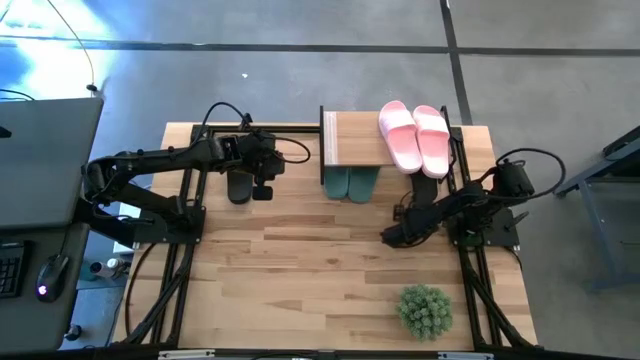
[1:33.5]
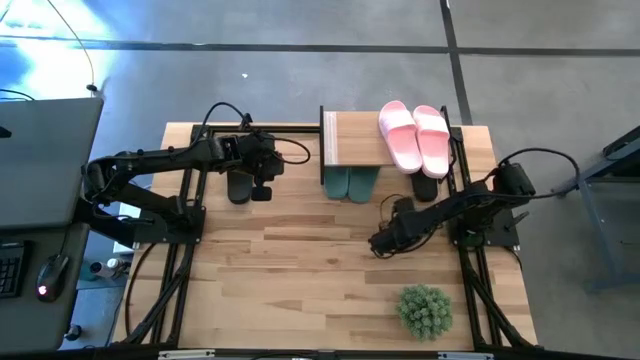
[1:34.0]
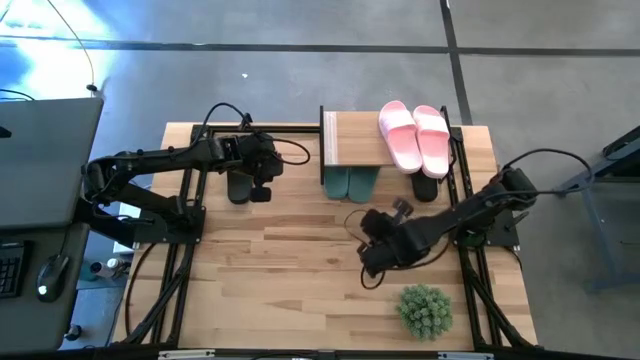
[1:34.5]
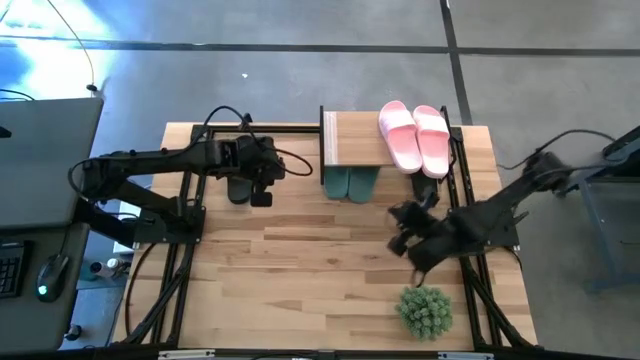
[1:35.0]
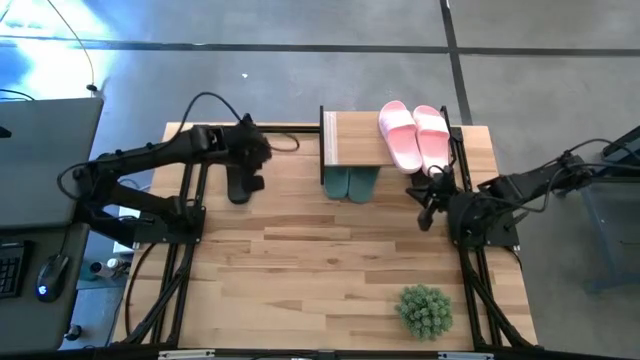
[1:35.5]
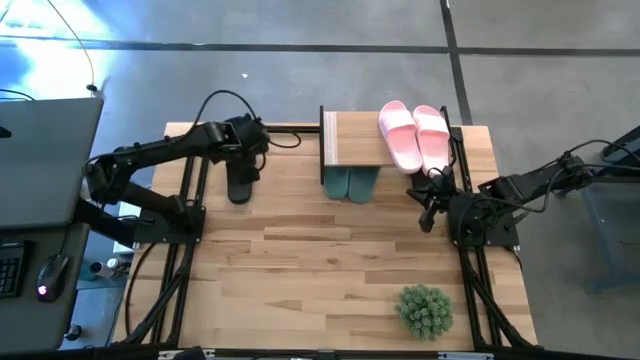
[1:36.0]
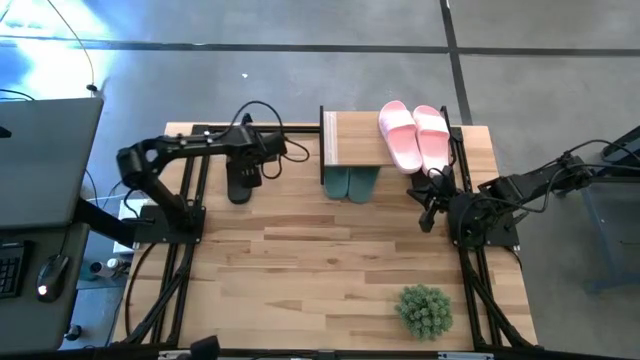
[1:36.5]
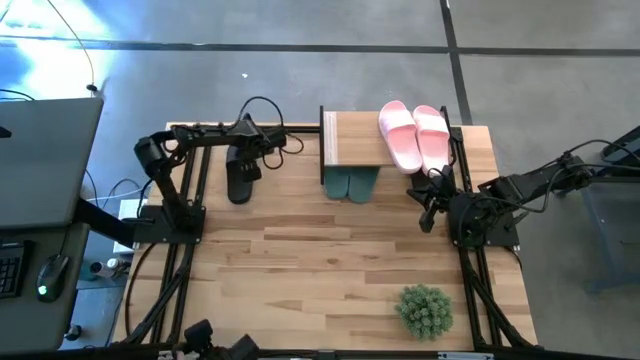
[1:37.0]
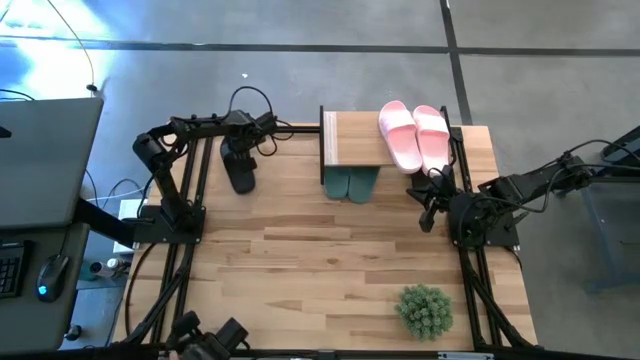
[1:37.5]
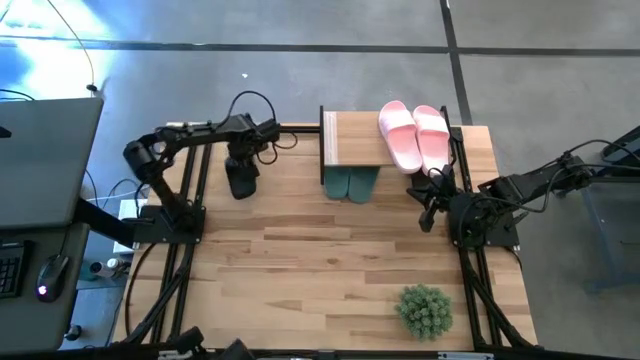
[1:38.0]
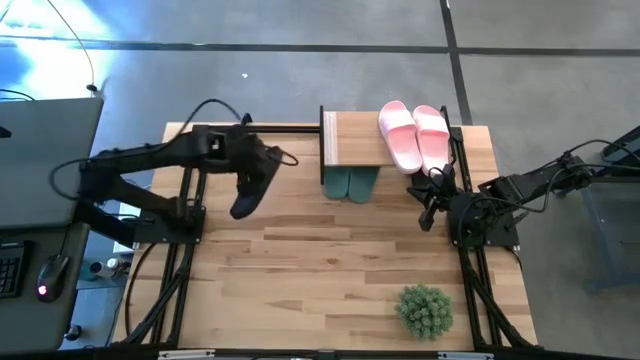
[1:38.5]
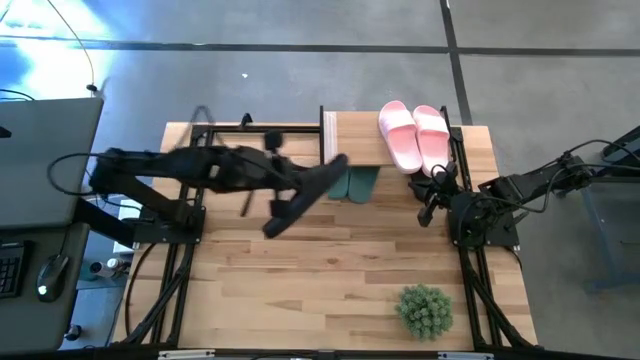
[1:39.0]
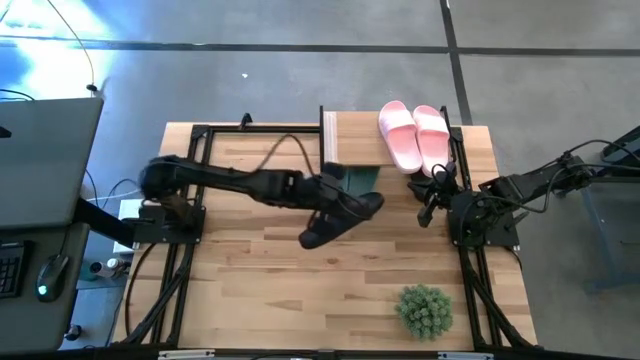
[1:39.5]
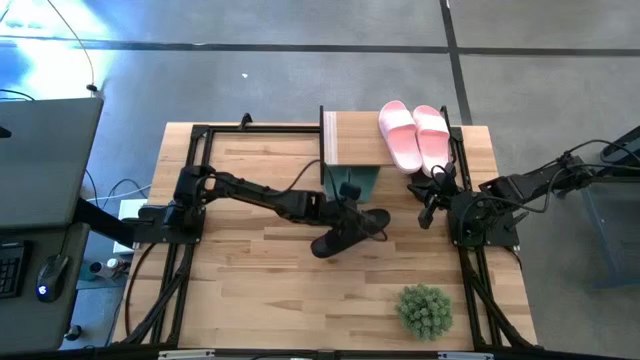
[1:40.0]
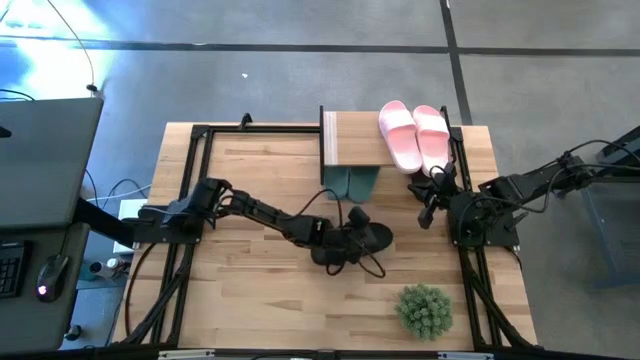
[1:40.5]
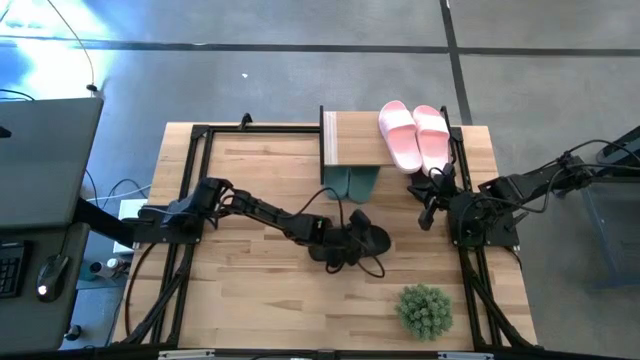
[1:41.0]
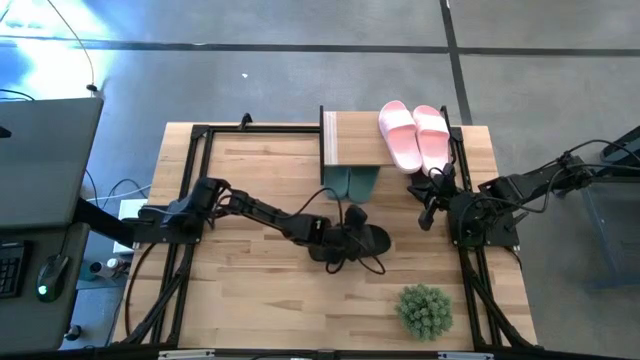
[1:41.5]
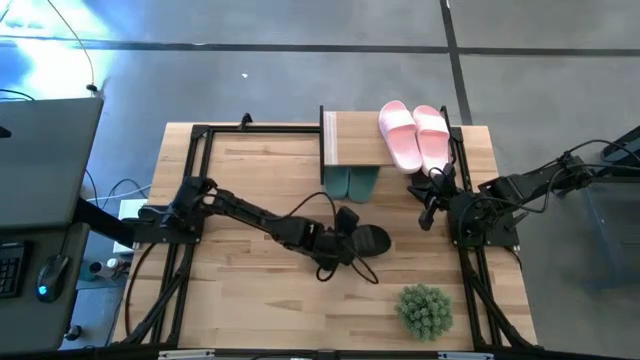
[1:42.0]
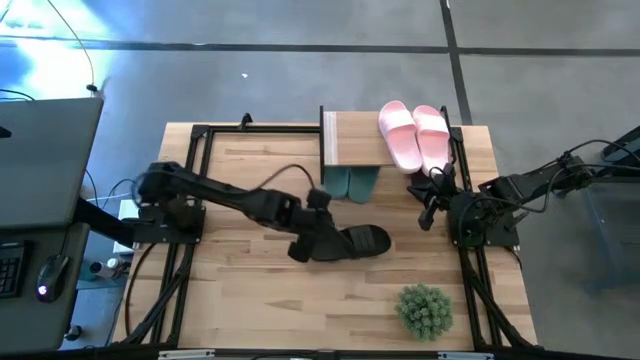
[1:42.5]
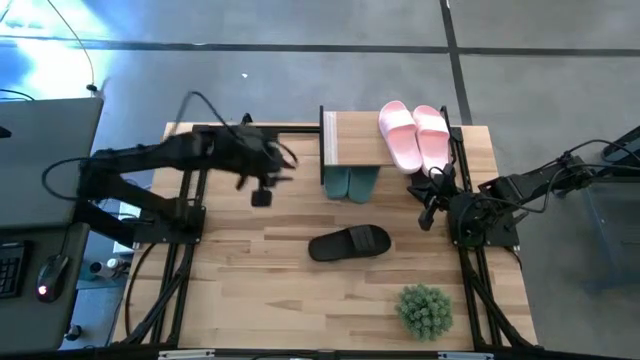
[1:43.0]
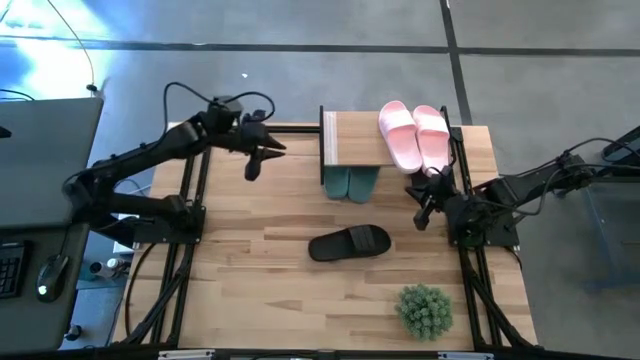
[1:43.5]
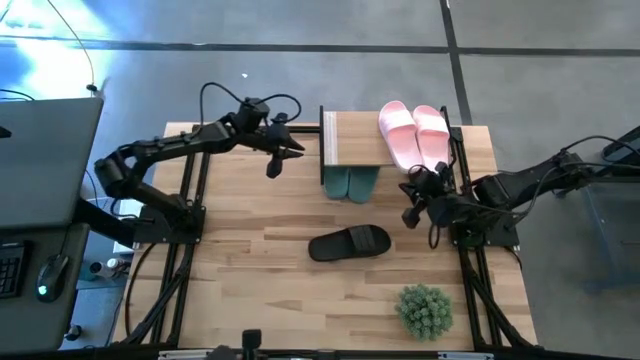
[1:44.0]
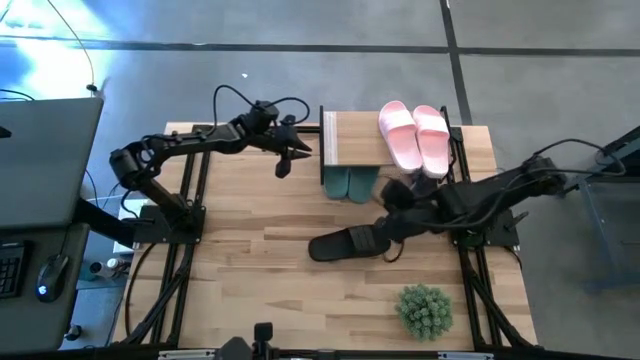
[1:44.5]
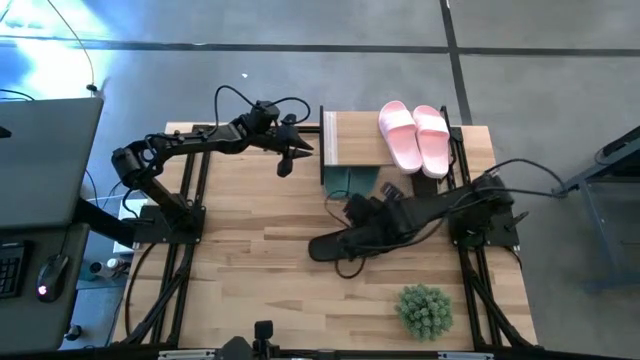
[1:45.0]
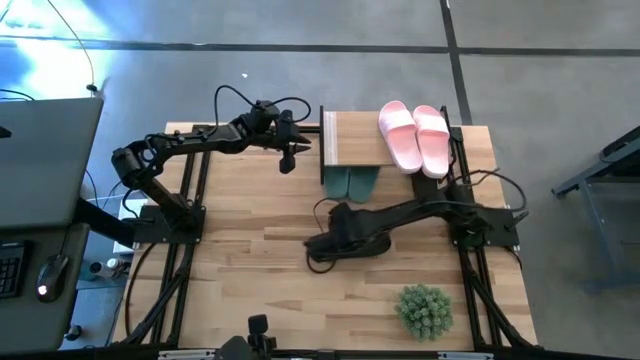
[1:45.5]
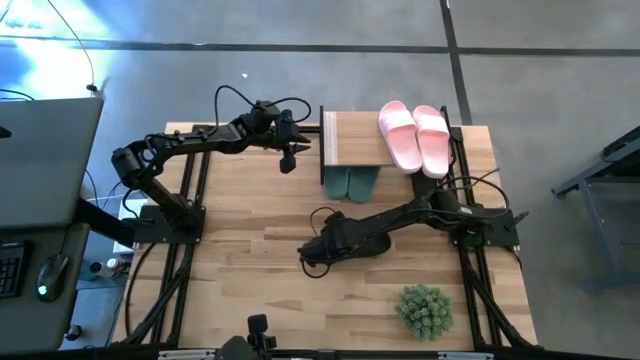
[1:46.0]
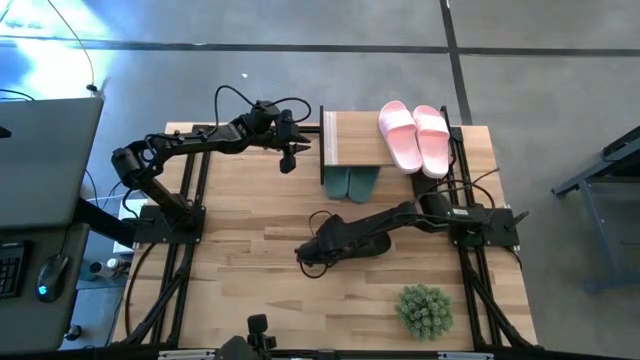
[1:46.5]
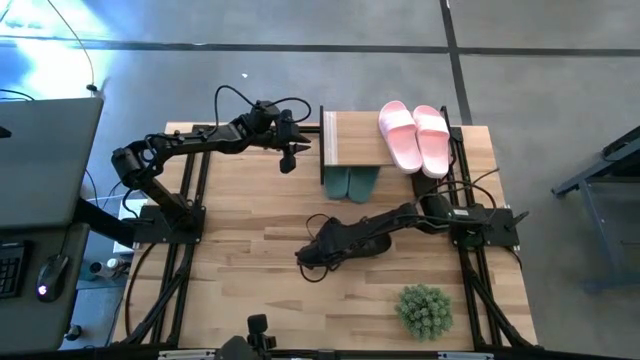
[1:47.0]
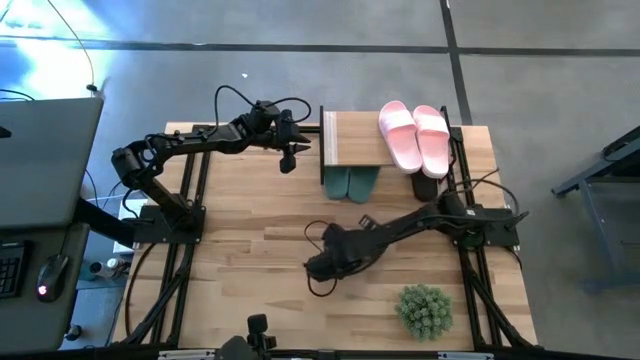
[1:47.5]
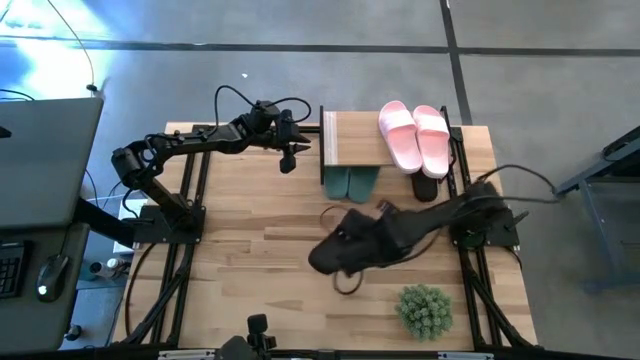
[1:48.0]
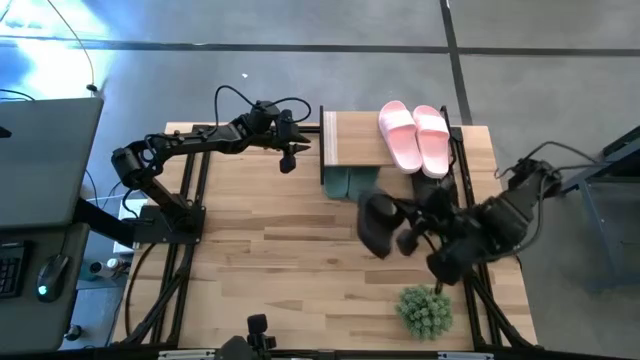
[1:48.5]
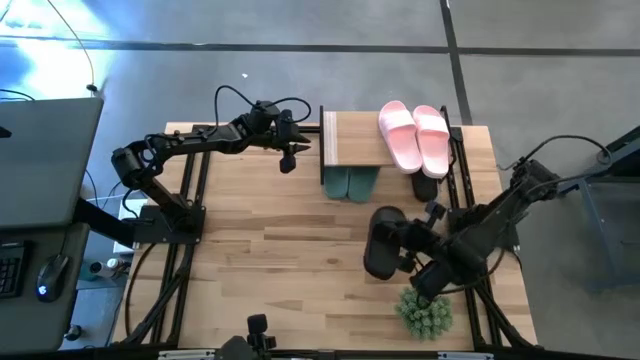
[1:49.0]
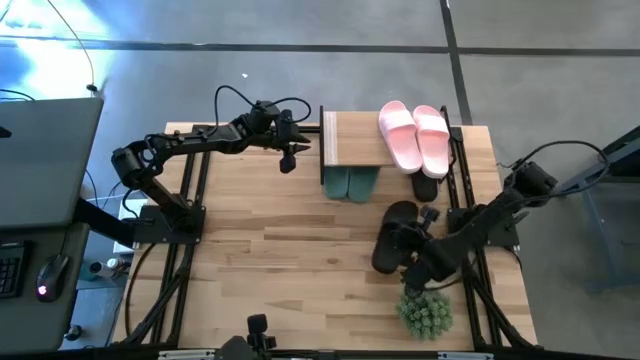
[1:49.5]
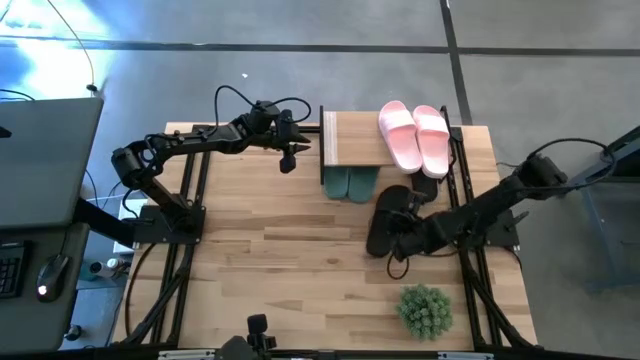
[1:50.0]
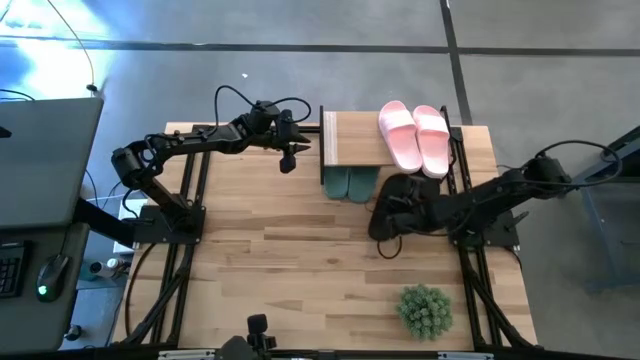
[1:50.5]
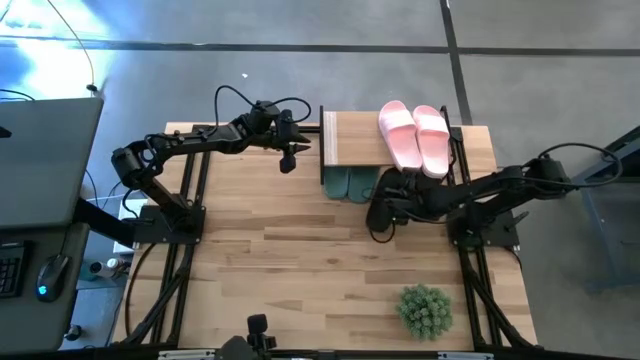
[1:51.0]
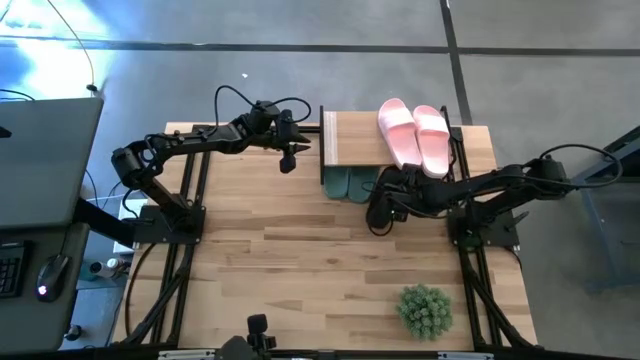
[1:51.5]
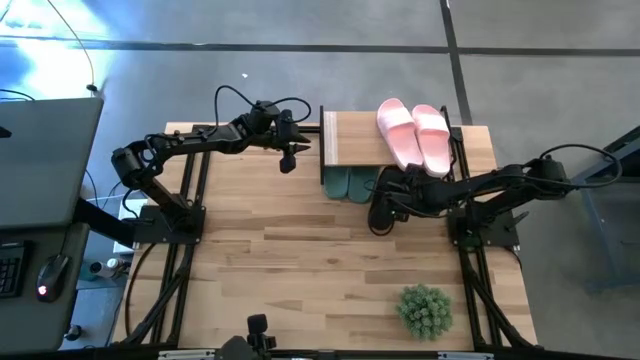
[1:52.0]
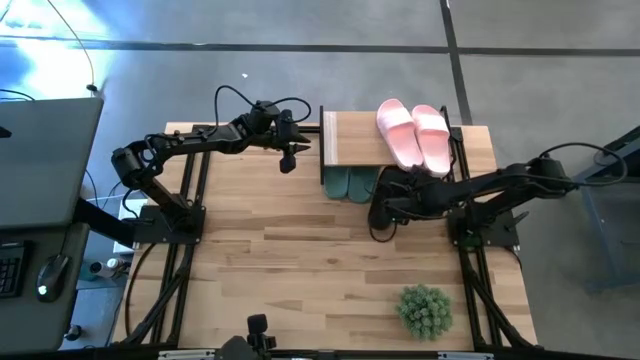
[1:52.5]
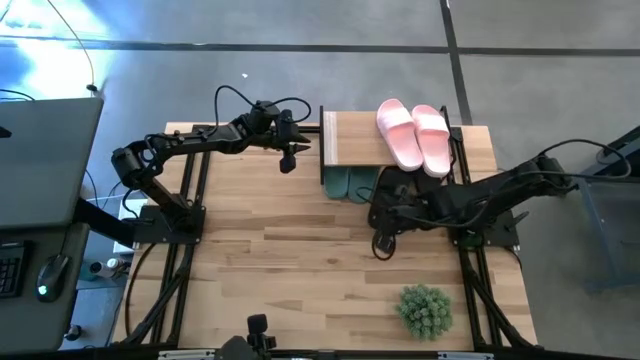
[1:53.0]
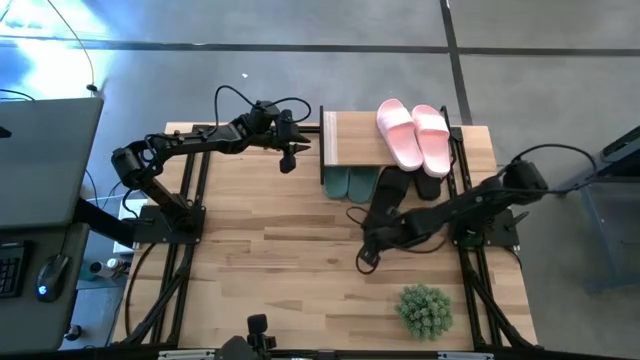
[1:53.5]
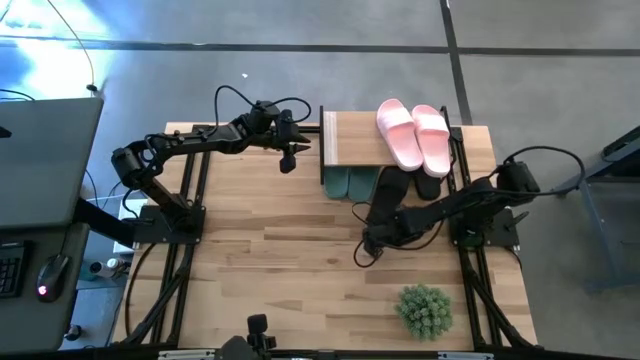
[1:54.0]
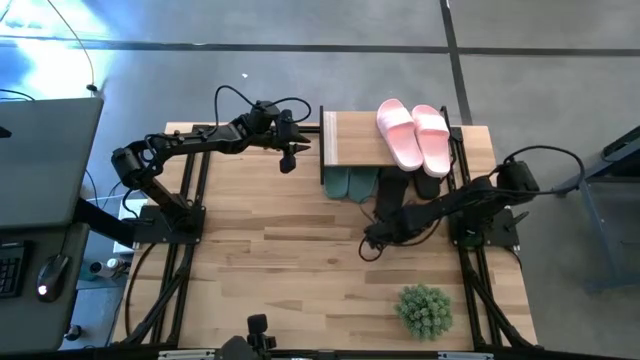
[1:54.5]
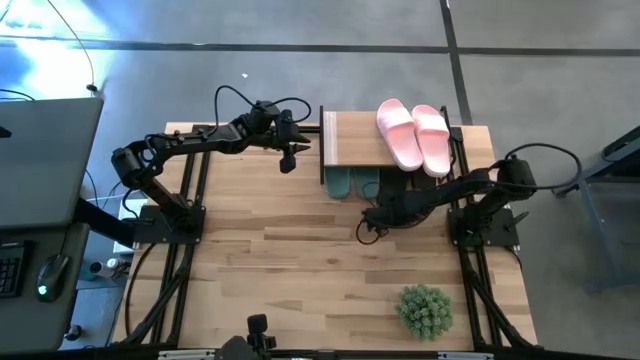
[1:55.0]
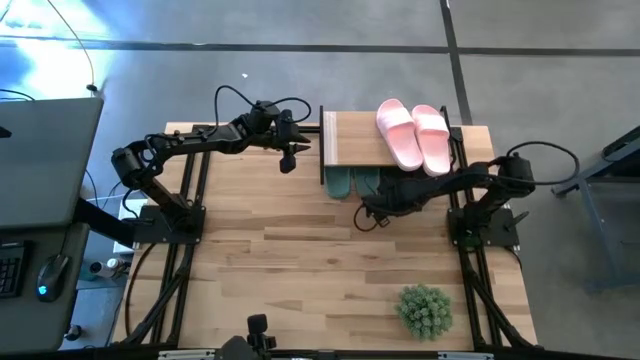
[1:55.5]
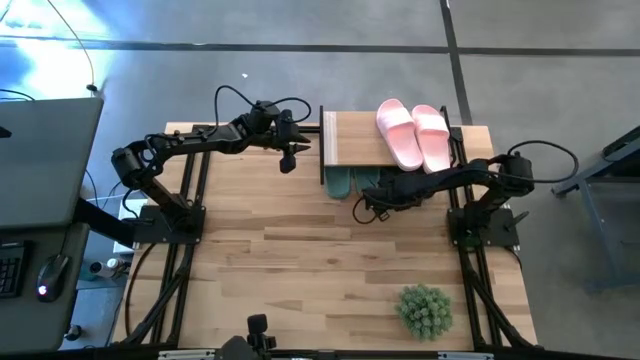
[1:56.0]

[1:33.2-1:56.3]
Task: Pick and place slides into the shelf
Put the black slipper under the shelf
